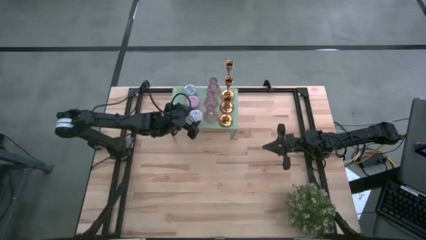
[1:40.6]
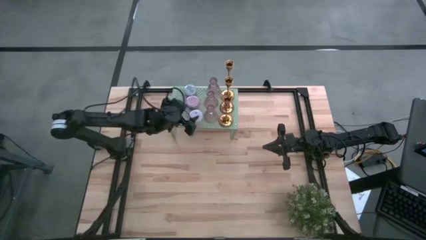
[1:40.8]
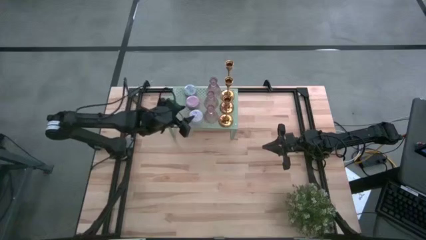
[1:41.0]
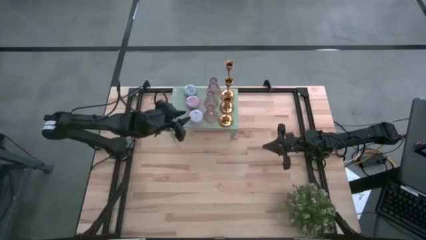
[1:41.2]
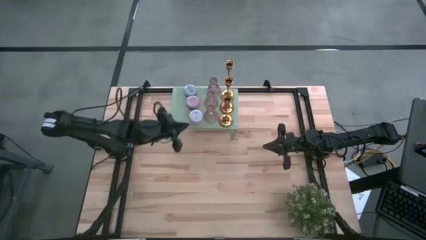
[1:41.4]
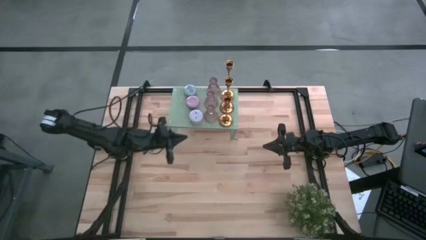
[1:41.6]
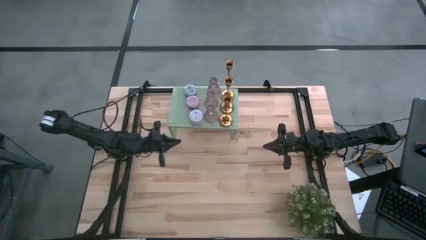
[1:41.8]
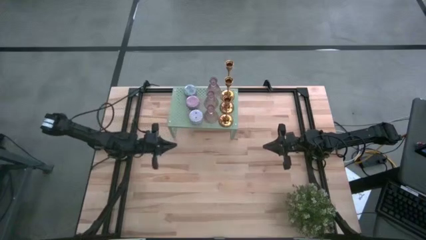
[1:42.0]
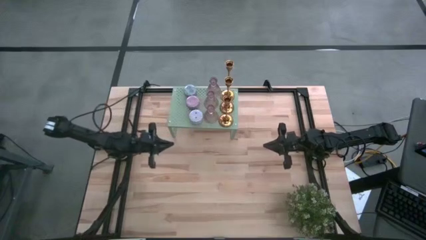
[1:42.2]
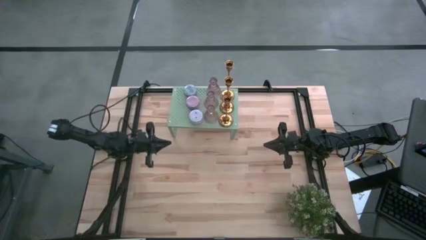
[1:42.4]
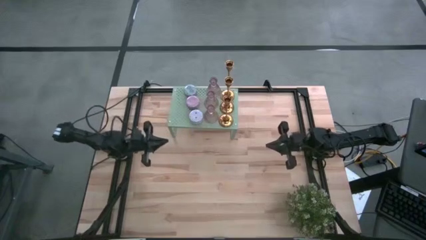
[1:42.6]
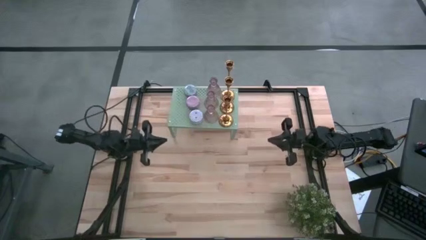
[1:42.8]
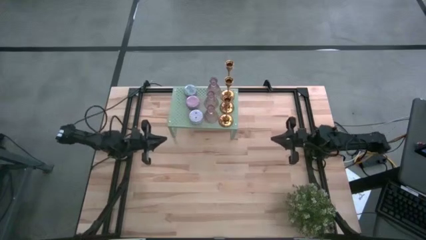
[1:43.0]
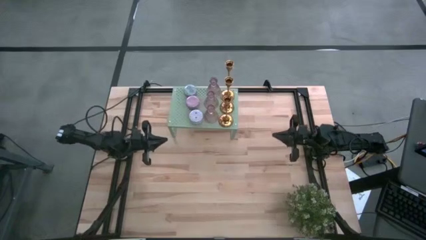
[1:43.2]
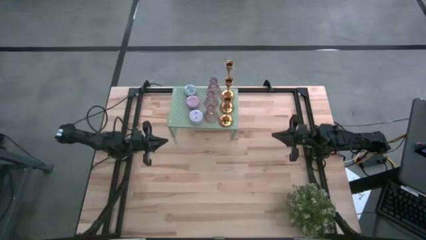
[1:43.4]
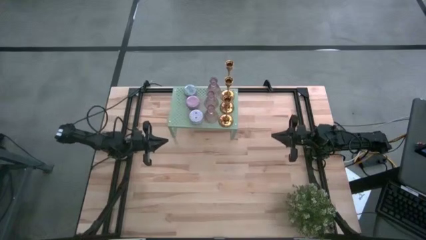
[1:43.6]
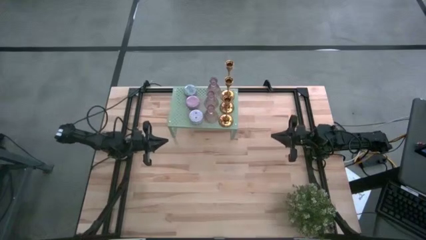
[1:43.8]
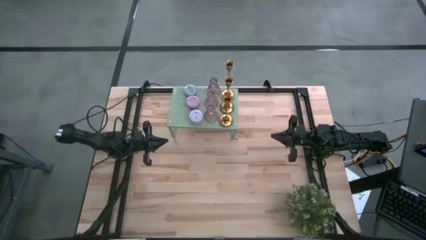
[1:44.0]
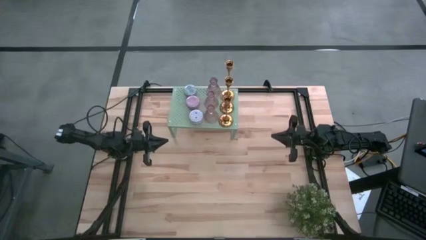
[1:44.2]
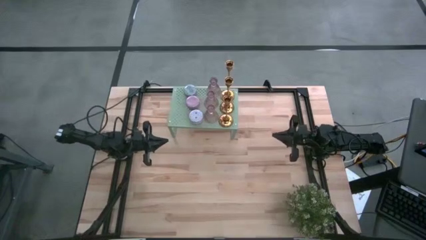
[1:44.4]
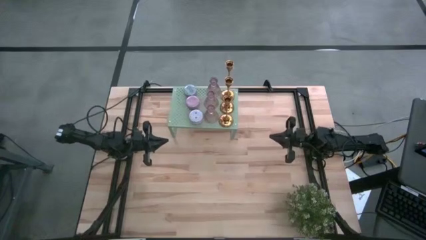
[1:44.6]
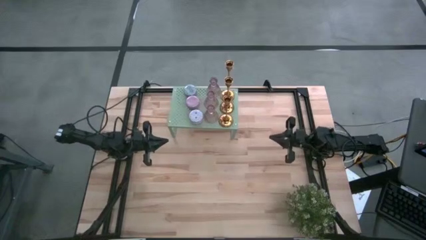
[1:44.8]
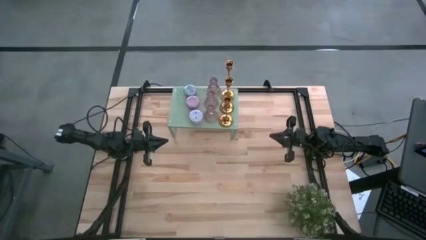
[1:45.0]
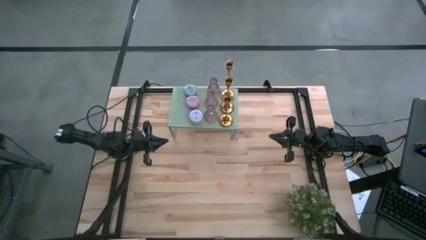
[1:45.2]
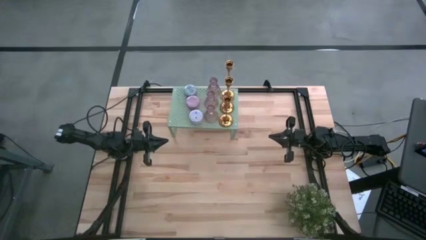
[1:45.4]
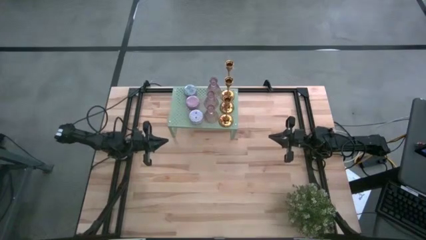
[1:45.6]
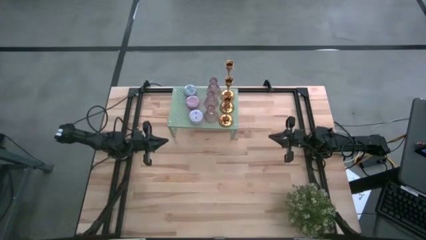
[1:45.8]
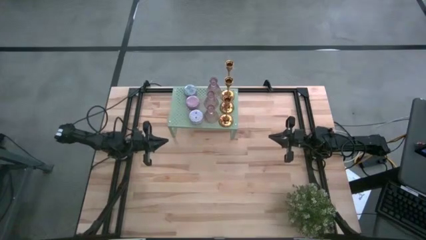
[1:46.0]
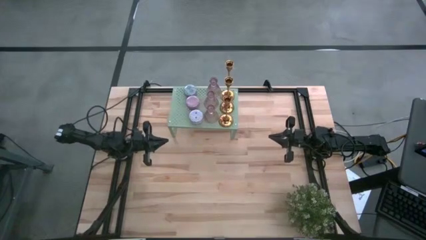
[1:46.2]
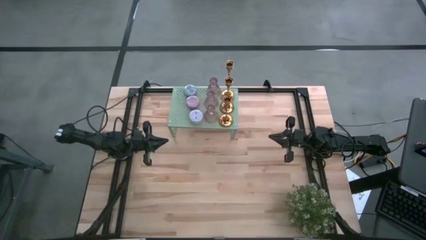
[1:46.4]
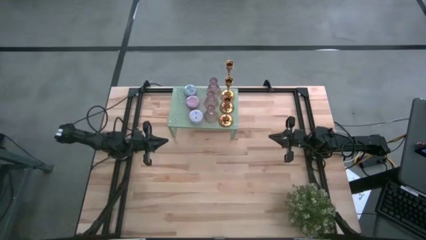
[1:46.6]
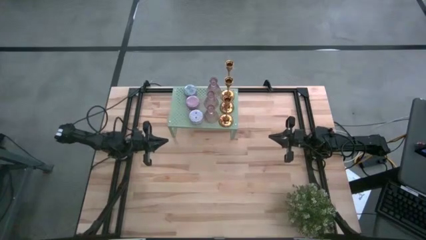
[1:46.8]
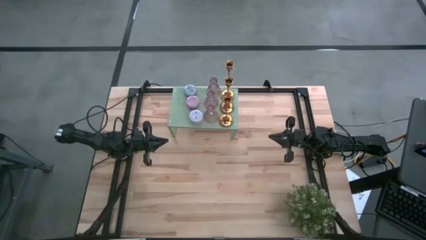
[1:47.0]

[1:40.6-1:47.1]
Task: Pick & Place candle stick holders
Return to Home Position

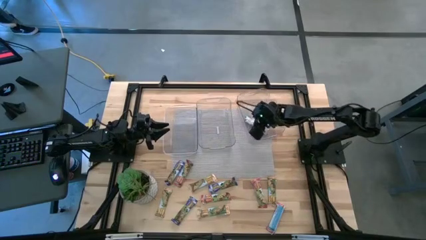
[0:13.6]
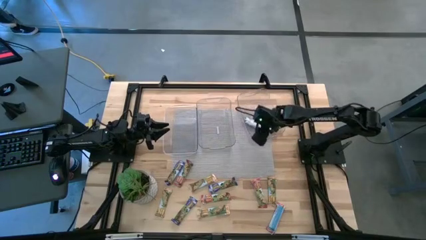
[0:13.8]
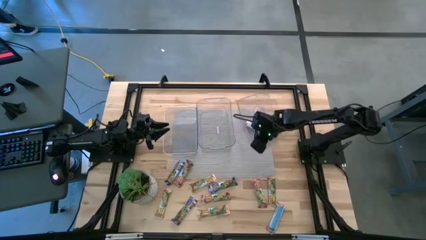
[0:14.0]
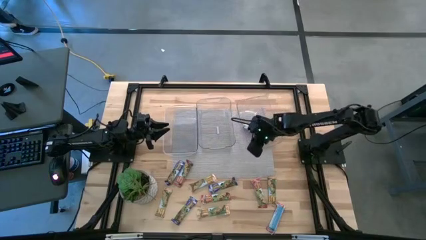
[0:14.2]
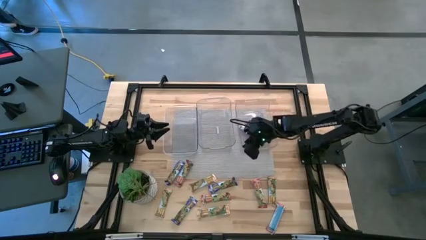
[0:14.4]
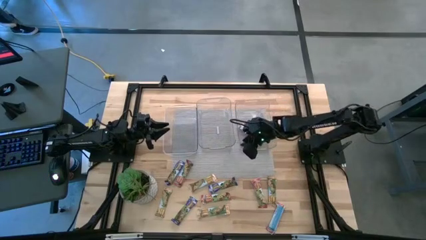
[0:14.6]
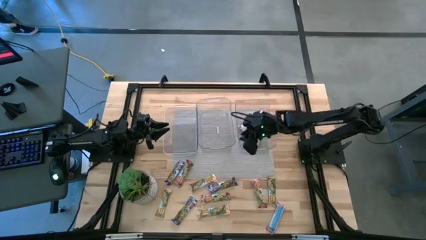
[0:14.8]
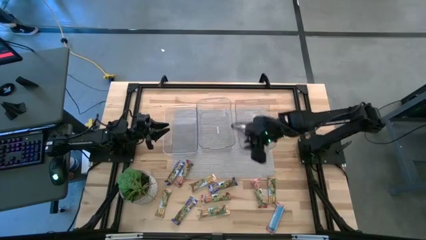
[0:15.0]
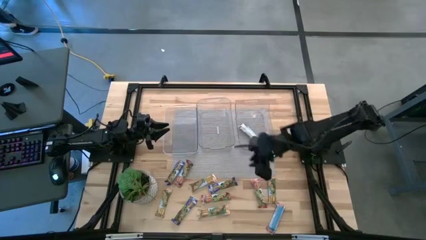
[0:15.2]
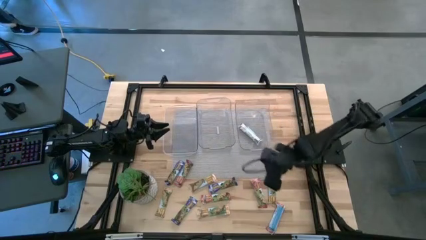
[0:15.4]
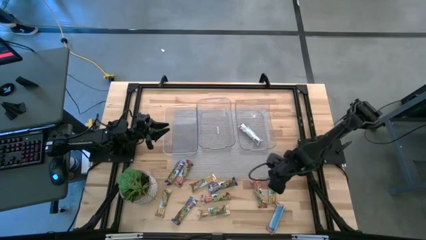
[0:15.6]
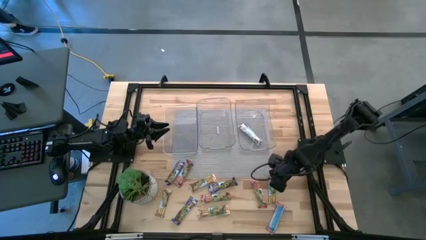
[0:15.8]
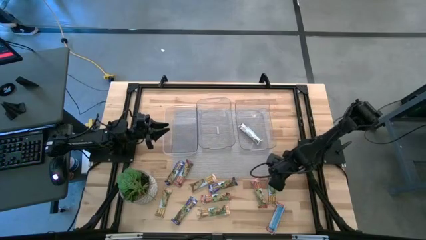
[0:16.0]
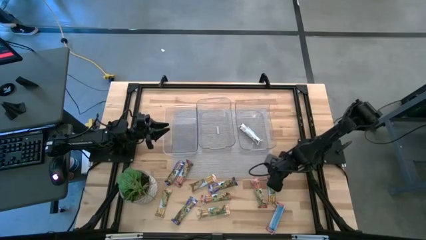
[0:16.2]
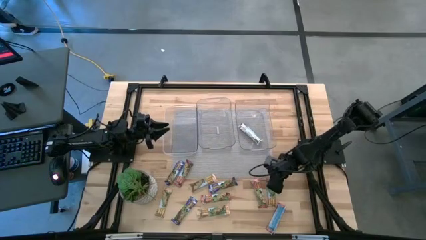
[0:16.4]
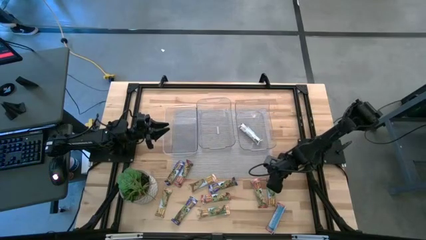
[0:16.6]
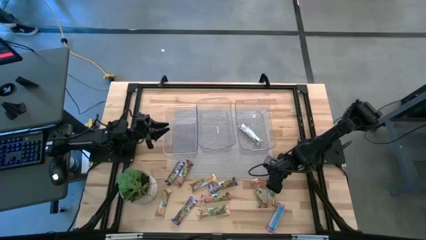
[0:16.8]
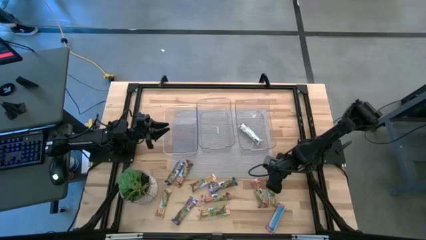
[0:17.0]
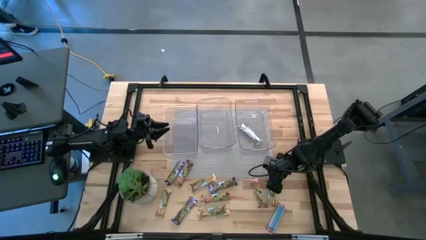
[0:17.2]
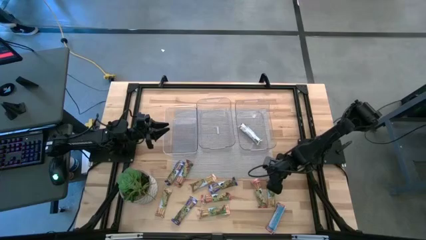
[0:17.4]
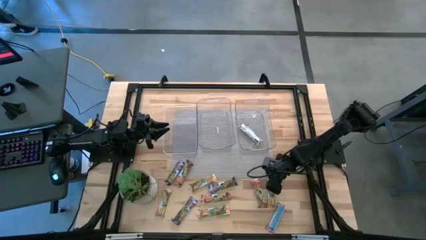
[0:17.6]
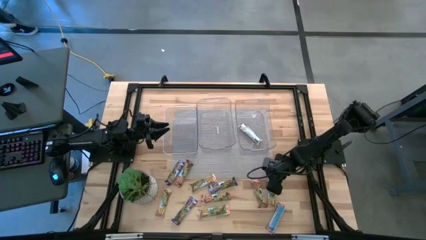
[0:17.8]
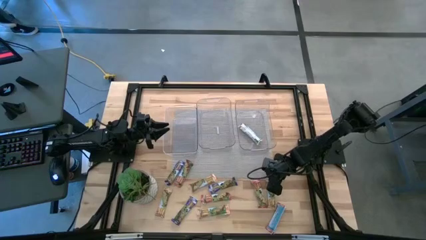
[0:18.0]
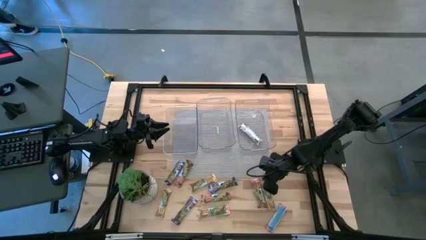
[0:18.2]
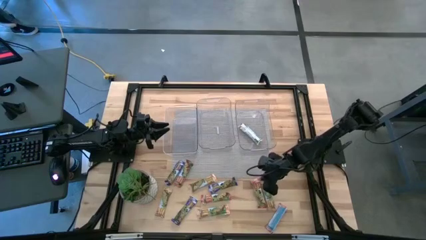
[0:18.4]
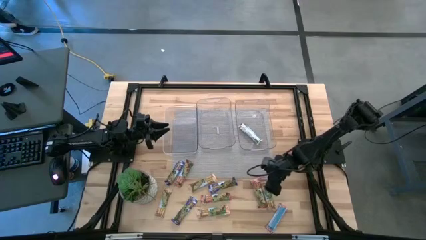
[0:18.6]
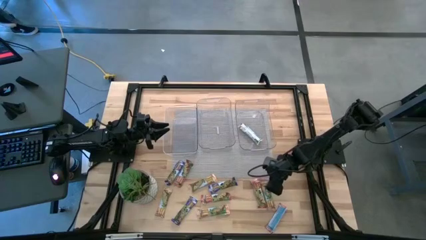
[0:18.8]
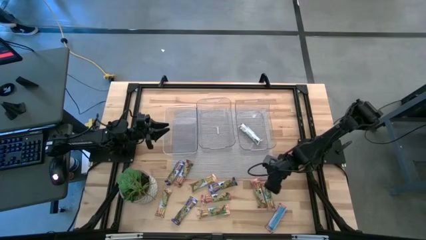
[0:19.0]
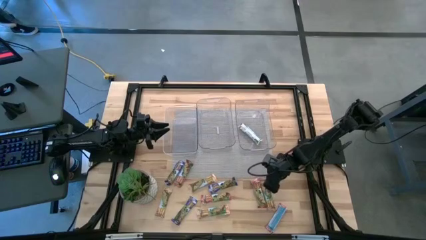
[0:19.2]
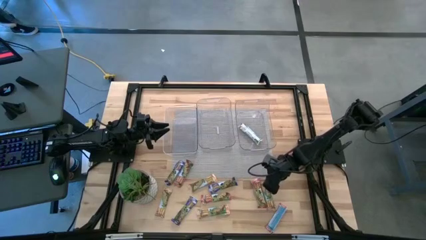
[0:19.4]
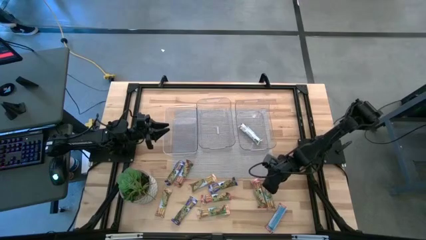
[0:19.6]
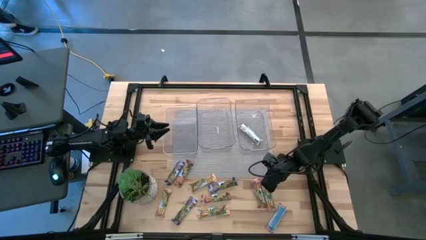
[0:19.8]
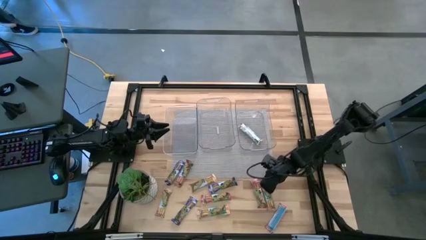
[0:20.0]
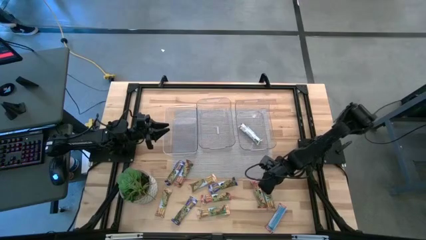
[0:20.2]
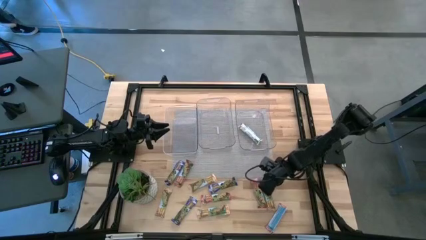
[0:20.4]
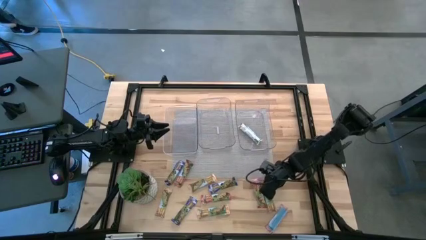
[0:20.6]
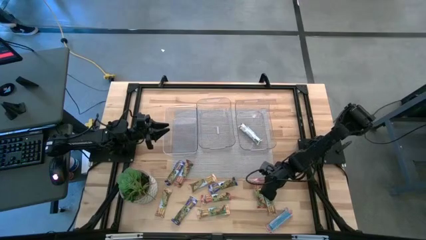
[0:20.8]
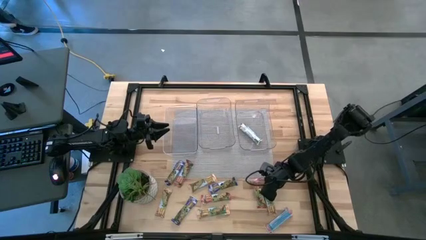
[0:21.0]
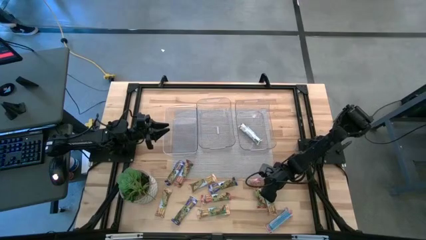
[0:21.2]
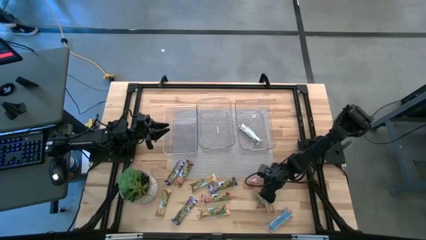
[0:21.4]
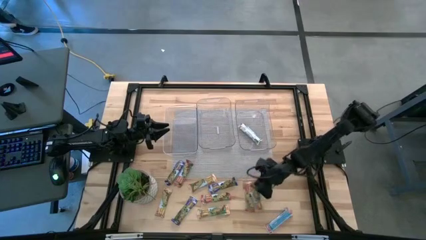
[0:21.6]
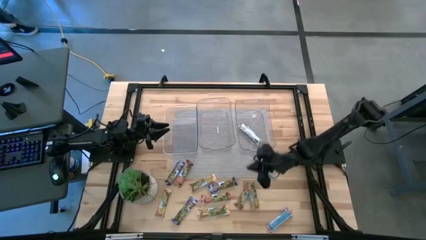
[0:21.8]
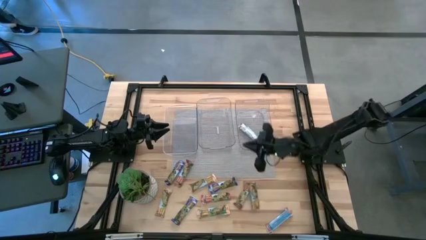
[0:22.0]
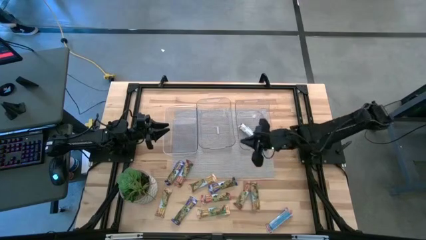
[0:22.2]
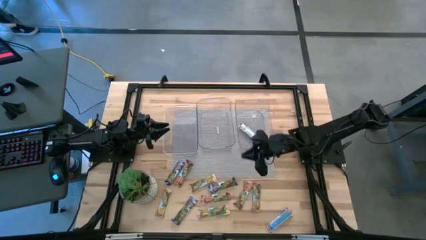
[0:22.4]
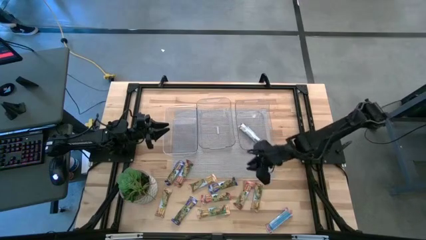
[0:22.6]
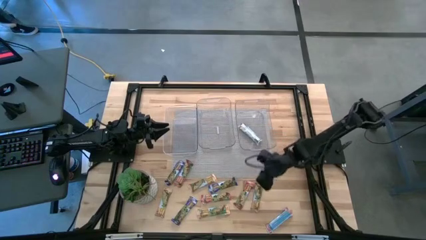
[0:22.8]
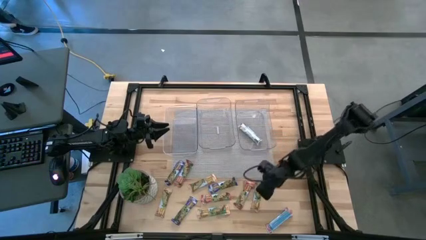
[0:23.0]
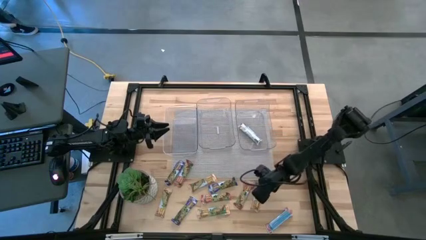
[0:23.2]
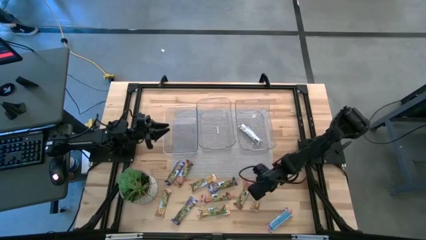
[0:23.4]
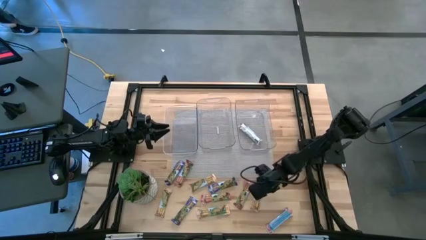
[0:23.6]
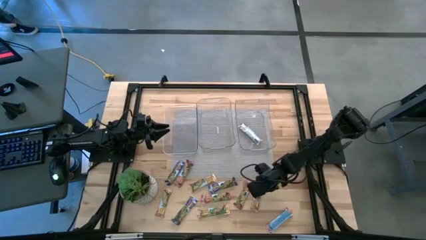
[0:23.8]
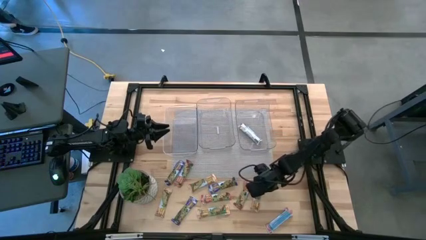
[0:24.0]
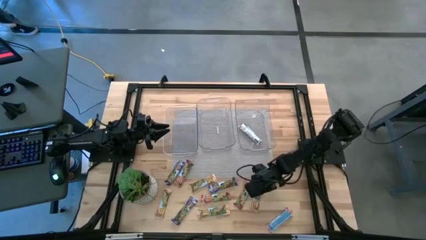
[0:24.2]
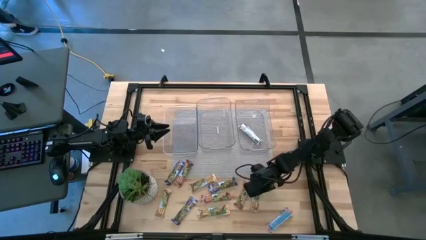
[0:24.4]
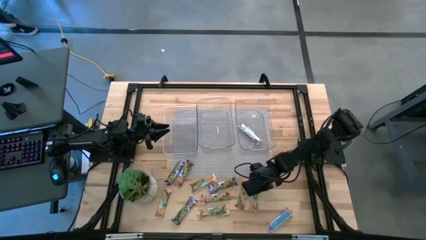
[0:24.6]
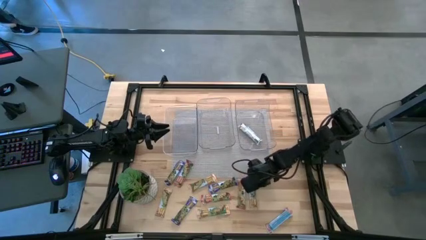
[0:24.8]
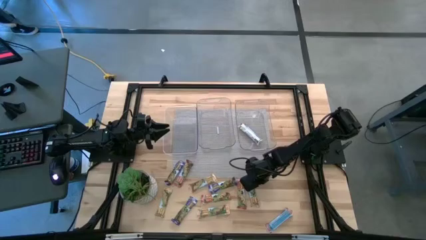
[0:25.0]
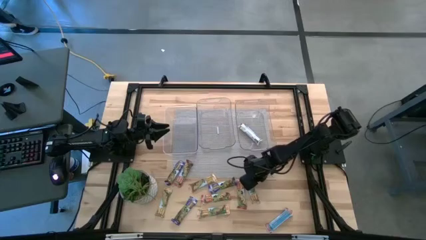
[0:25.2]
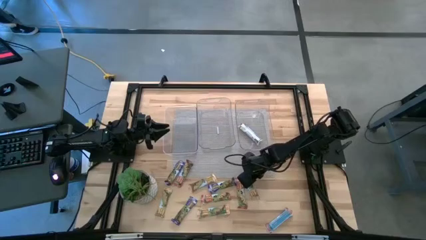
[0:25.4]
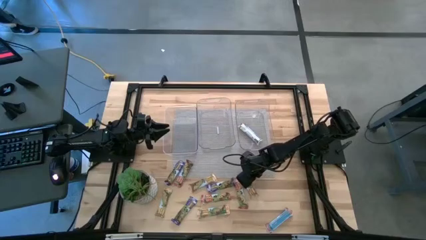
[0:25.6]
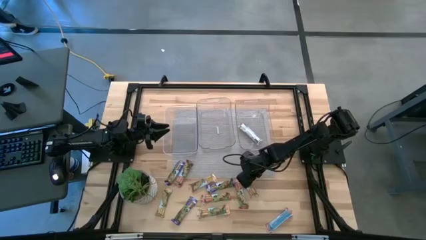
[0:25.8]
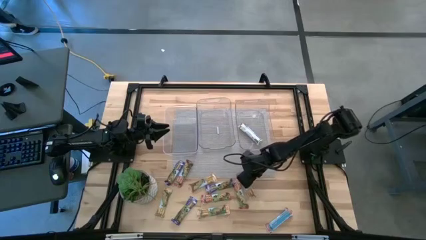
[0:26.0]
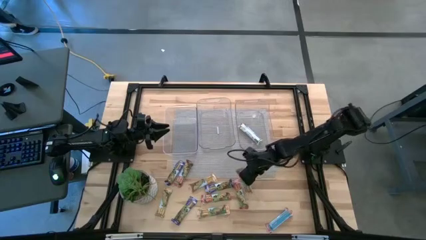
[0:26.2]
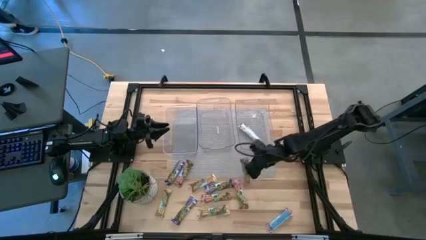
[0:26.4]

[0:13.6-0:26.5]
Task: Pick and place Granola Bars by type
Put the orange granola bar into the right transparent bin
